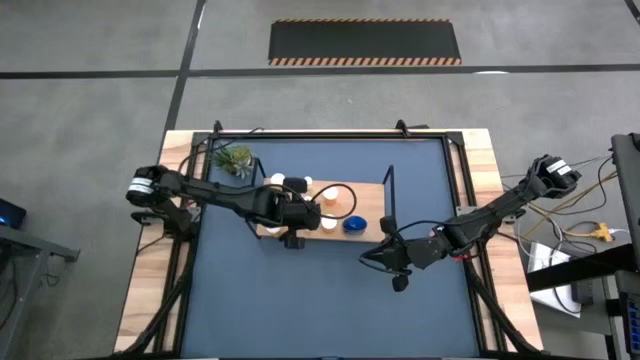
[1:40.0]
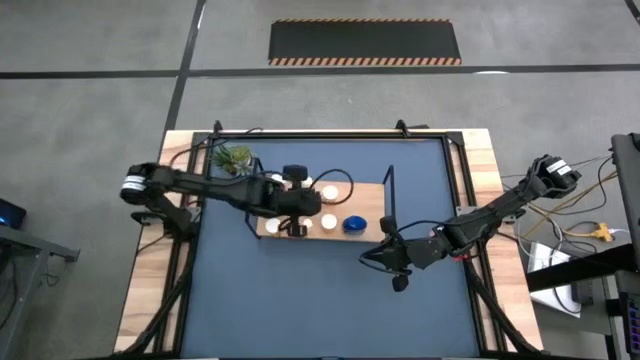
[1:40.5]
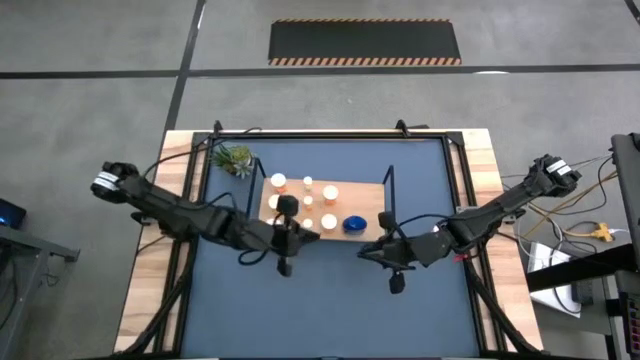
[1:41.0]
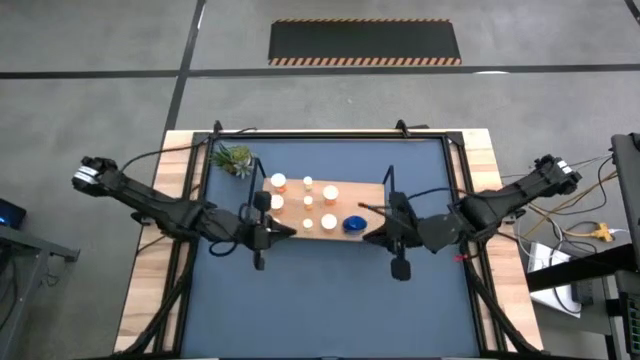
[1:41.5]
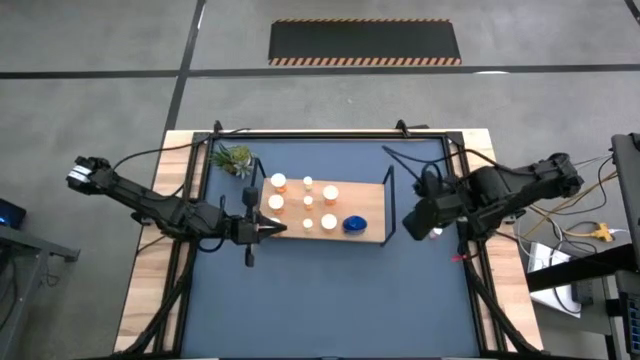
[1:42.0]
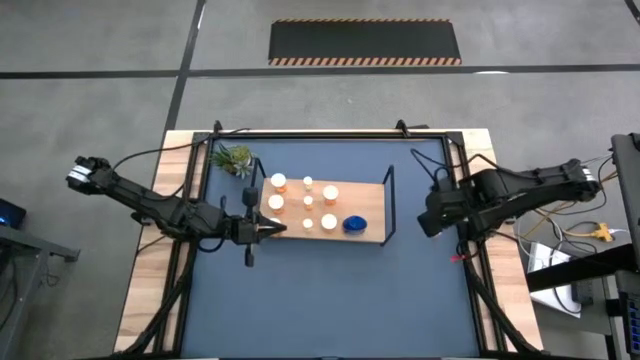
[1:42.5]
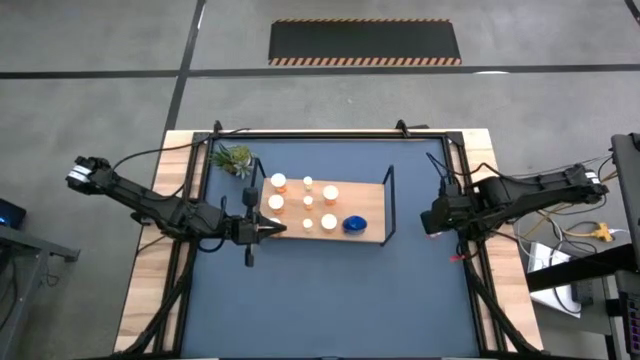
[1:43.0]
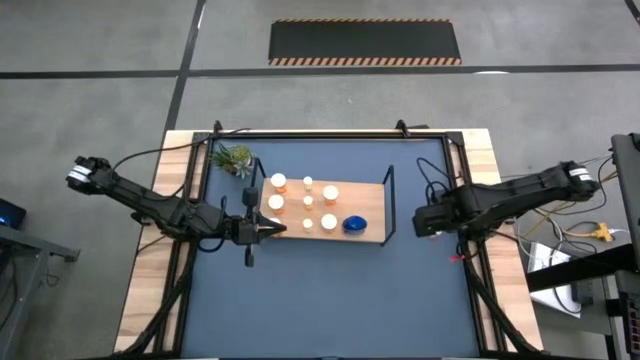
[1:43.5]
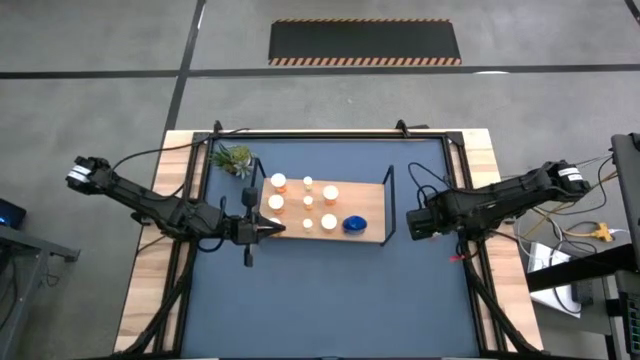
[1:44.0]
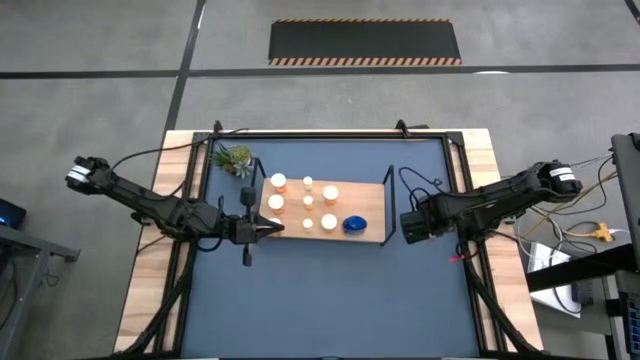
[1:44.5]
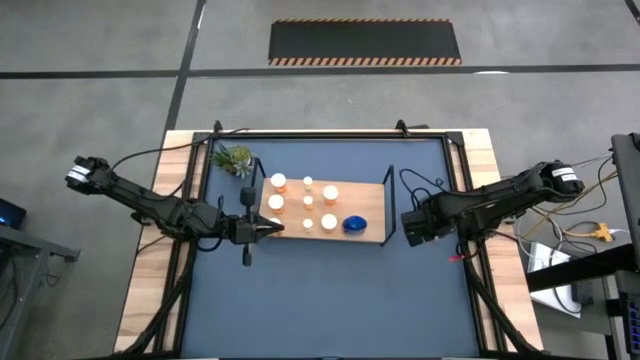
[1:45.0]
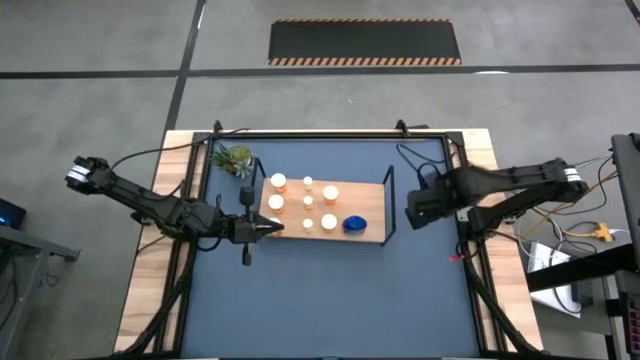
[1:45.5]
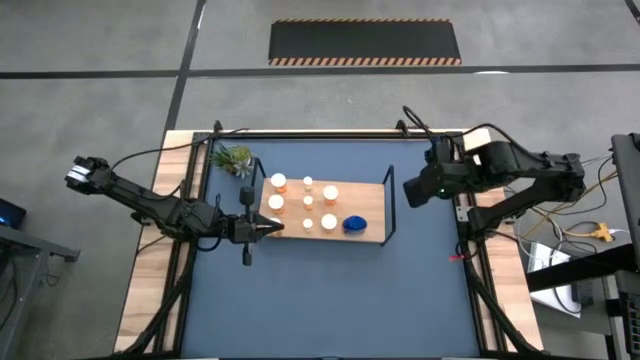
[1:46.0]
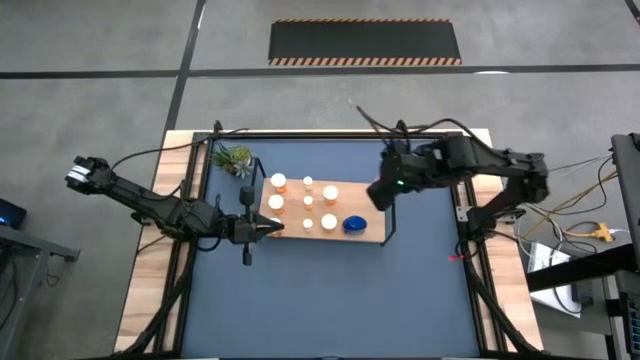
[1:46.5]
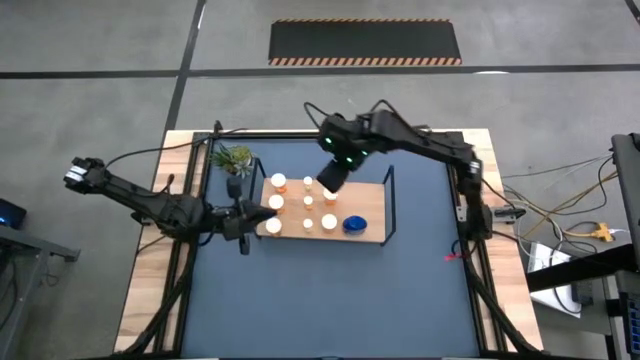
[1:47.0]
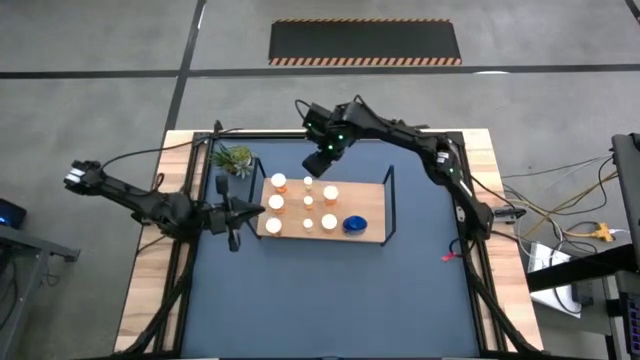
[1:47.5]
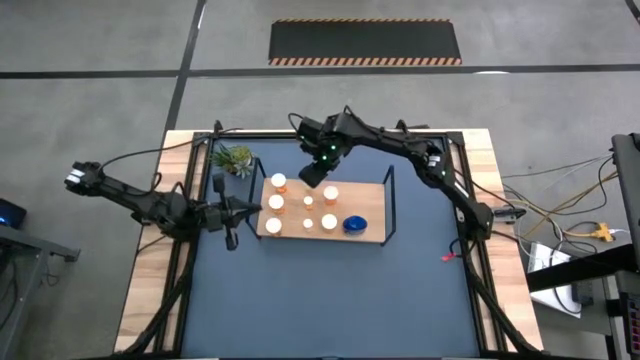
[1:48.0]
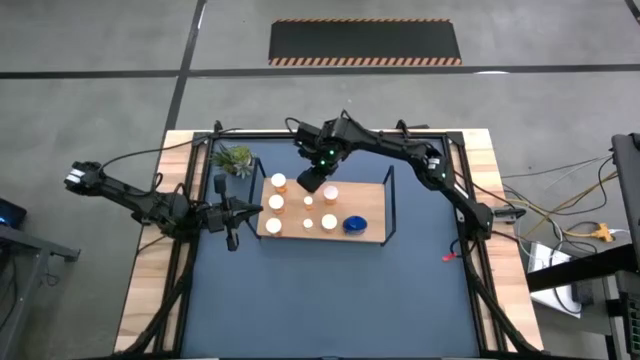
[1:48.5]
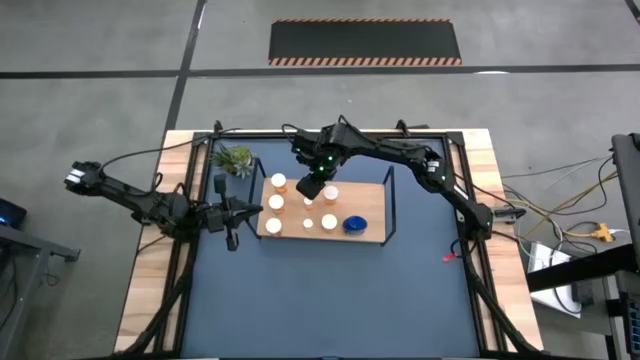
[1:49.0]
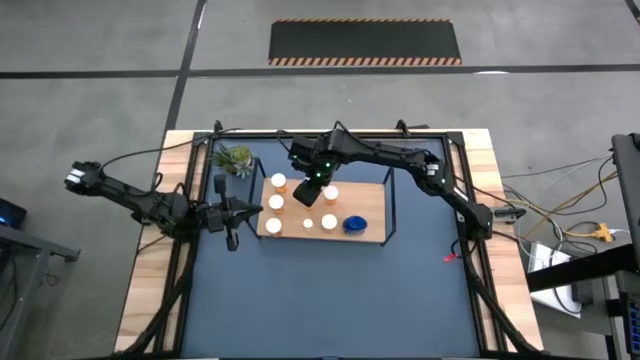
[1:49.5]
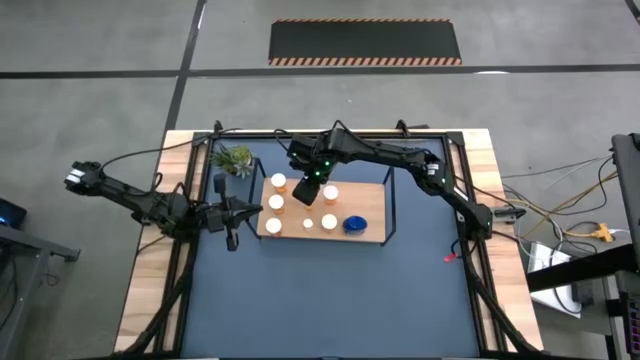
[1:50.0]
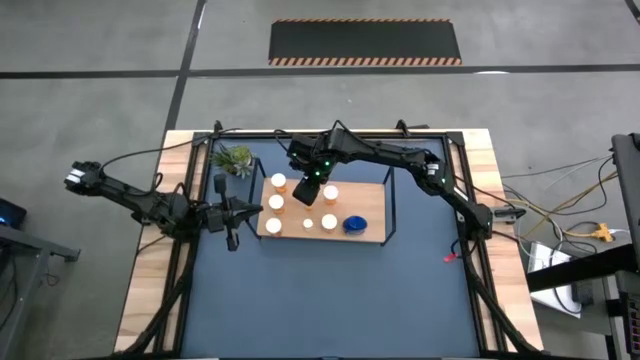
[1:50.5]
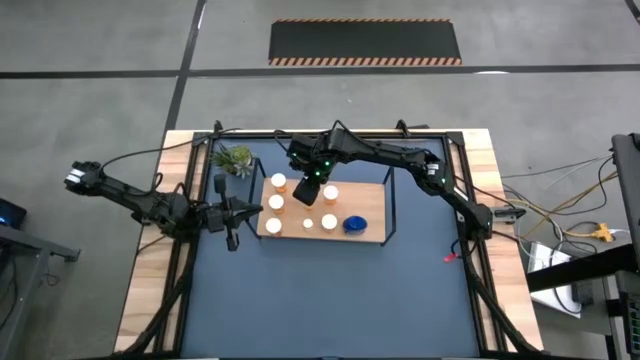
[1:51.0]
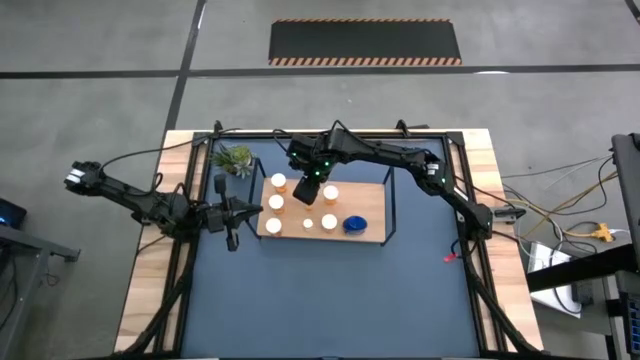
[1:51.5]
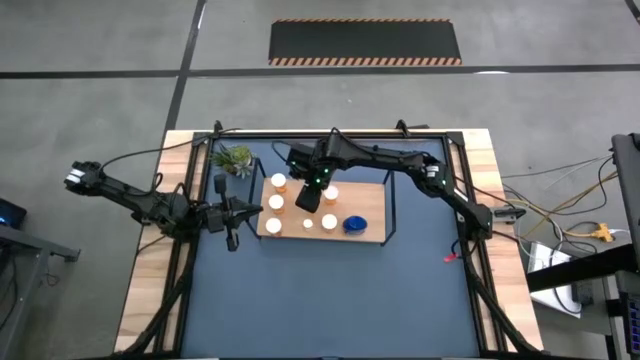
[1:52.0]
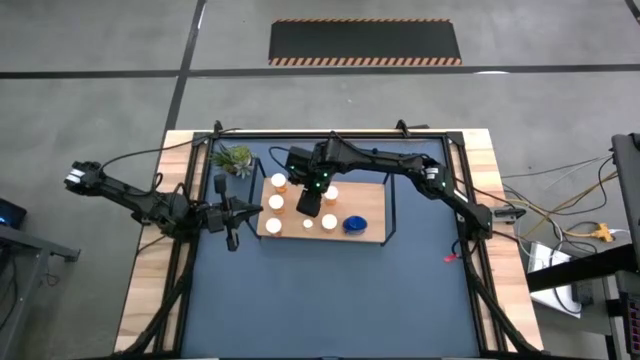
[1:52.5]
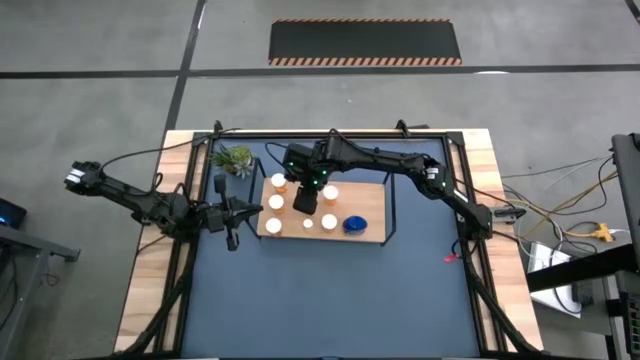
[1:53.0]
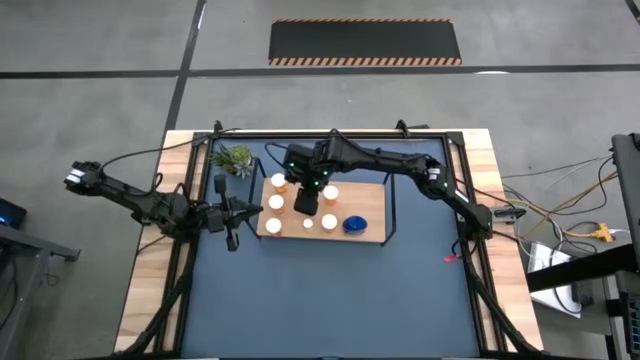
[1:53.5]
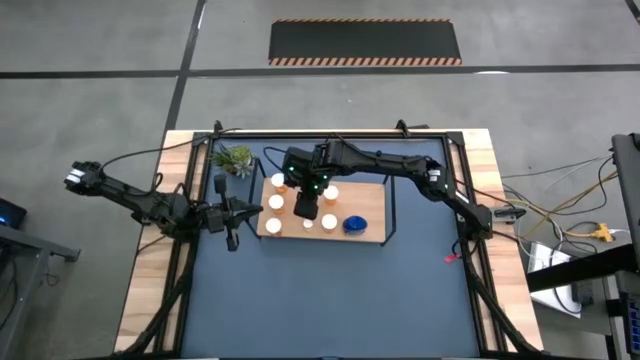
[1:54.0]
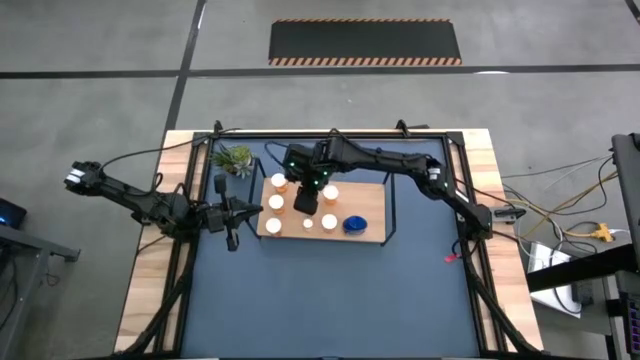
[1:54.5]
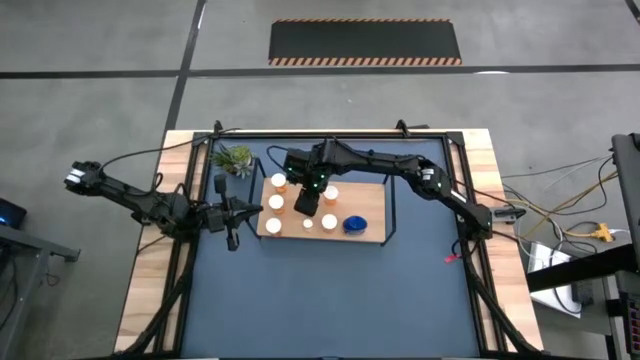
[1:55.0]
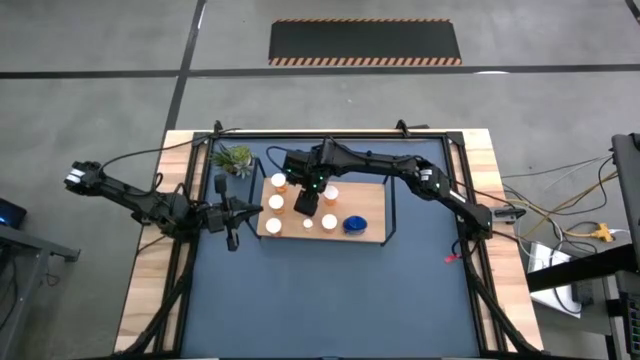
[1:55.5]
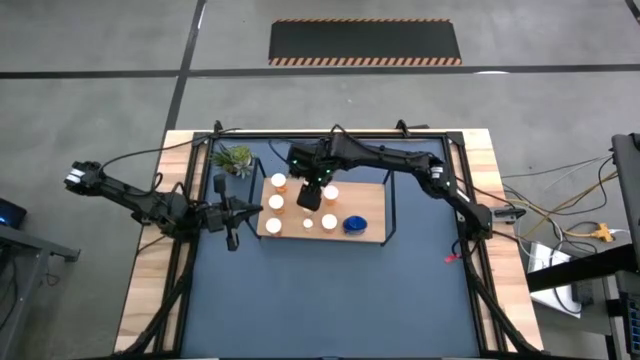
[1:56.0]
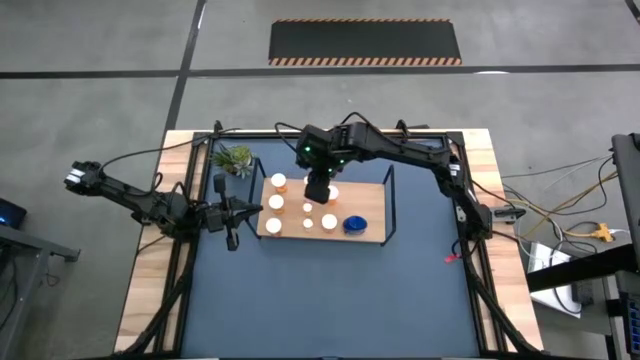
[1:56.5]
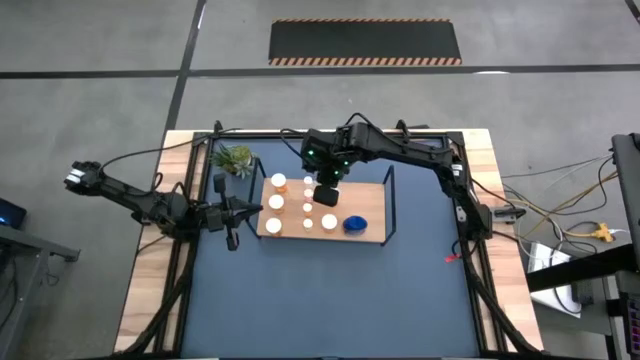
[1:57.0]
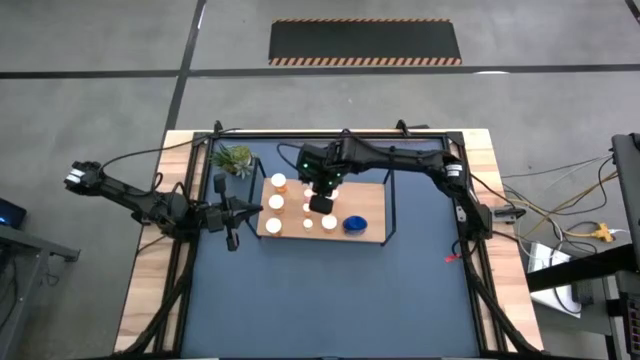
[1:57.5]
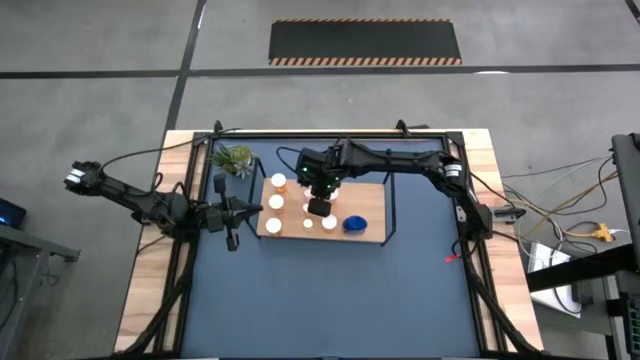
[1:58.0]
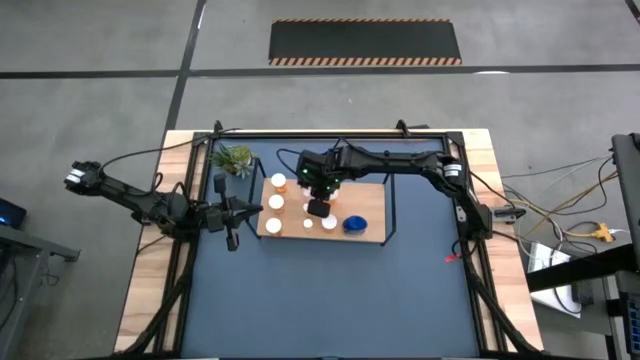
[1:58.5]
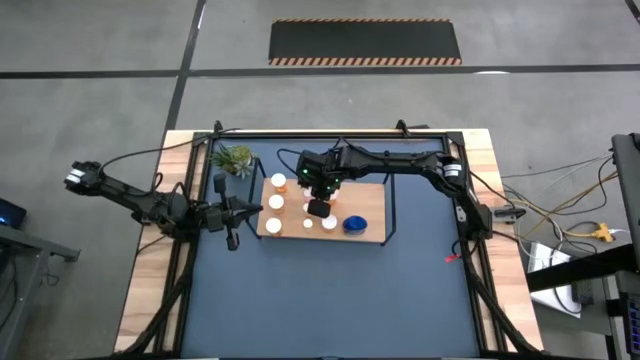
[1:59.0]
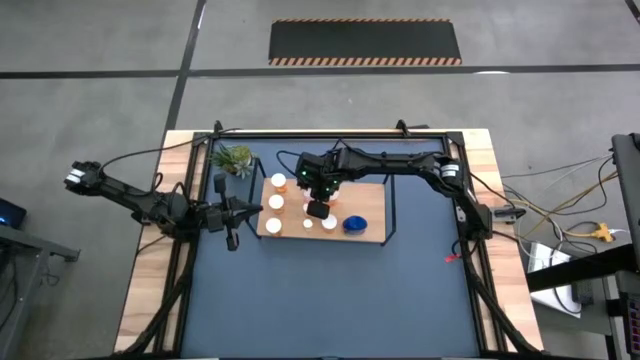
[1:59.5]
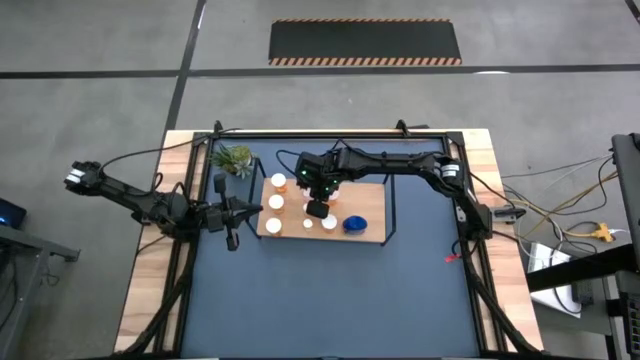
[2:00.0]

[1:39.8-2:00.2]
Task: Pick and place medicine bottles onto shelf by color
Put the pink pill bottle on to the shelf aligned with the small pill bottles

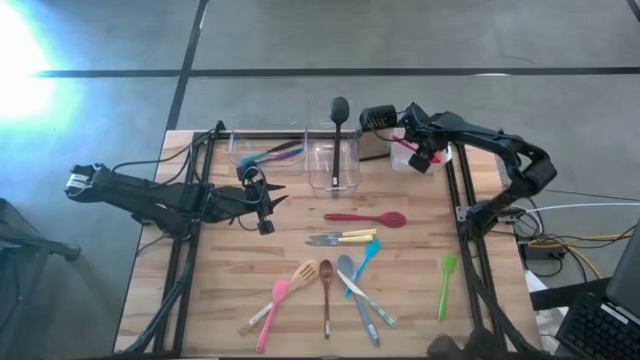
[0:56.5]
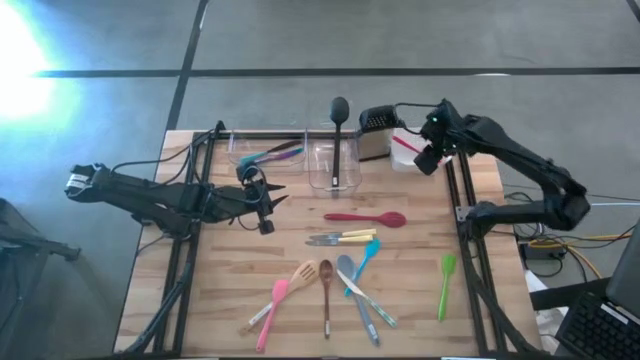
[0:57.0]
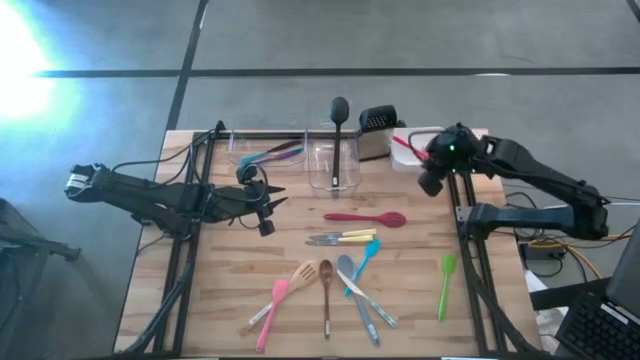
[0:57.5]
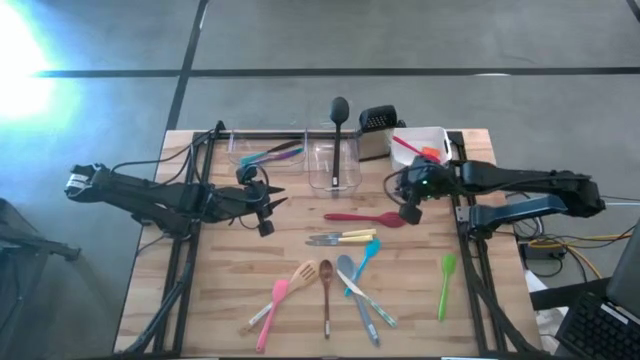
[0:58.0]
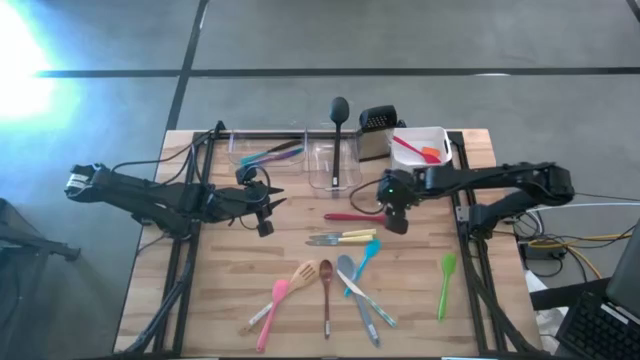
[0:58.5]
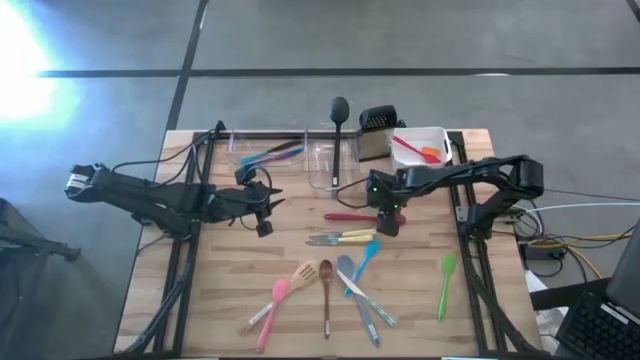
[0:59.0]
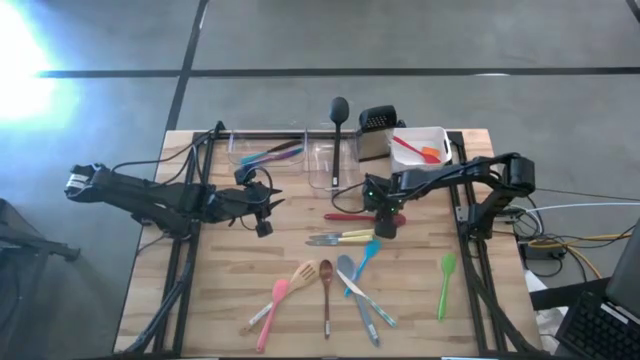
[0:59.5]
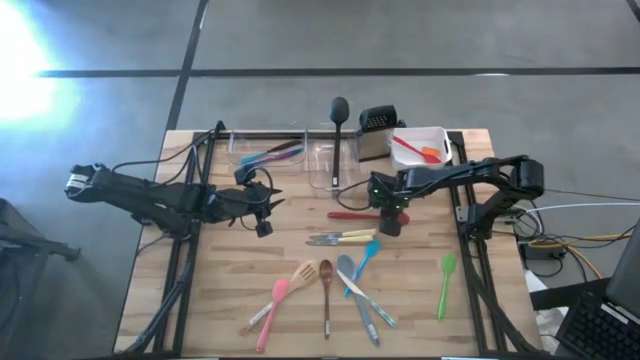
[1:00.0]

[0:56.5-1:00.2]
Task: Pick & Place Kitchen Items
Put the red serving spoon into the right transparent bin
